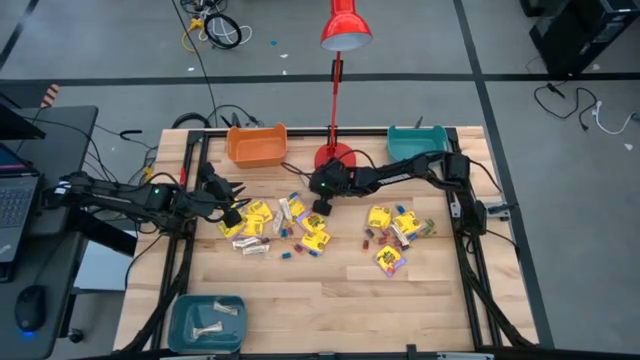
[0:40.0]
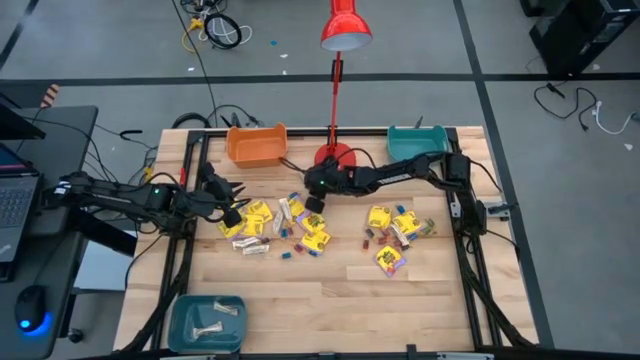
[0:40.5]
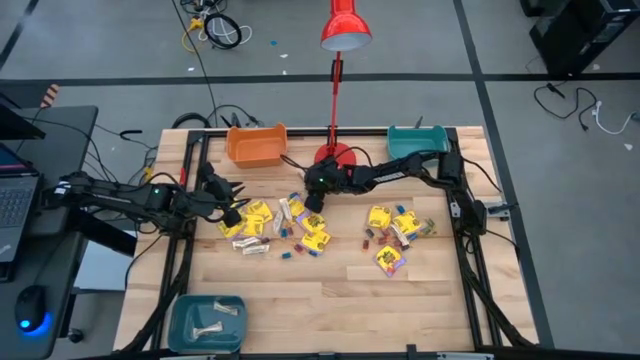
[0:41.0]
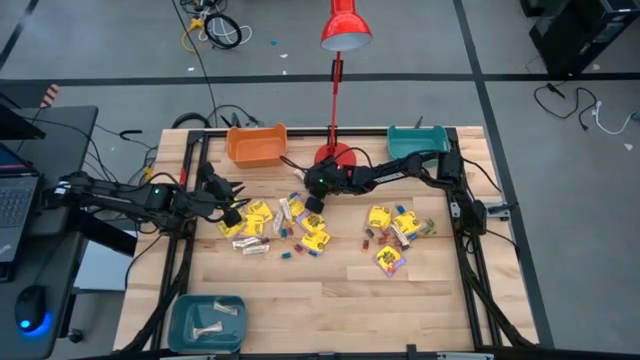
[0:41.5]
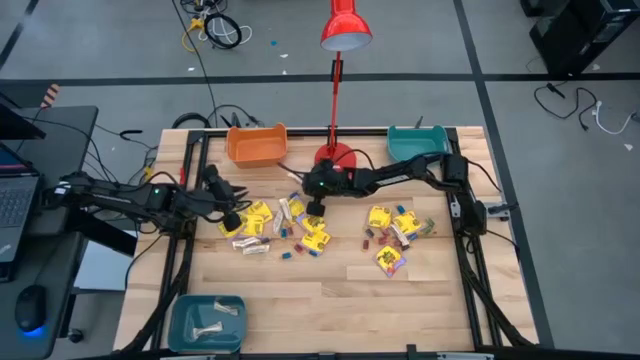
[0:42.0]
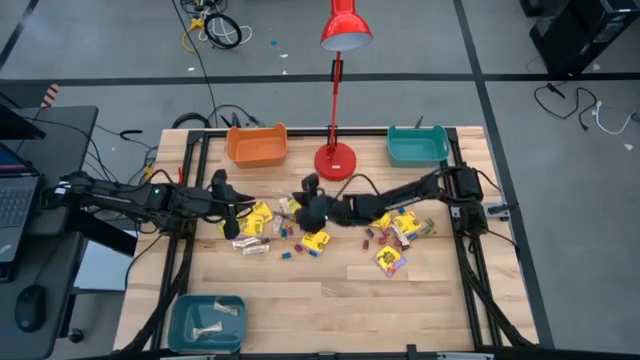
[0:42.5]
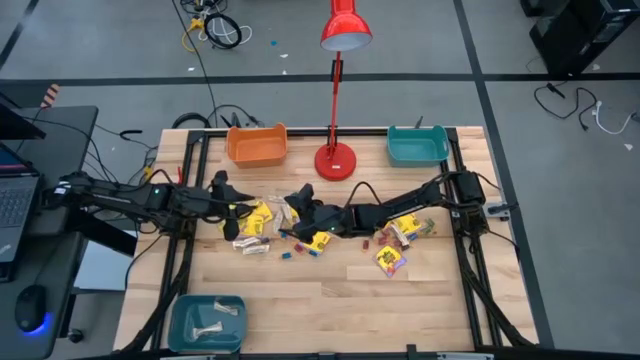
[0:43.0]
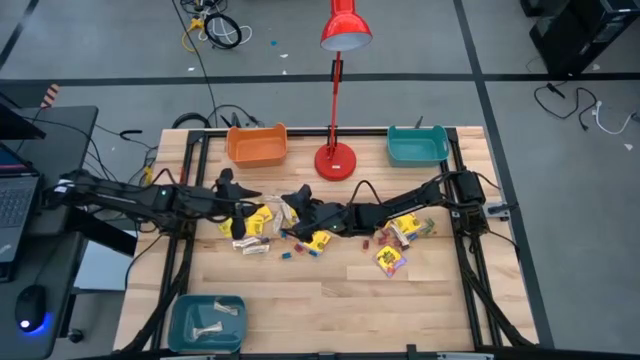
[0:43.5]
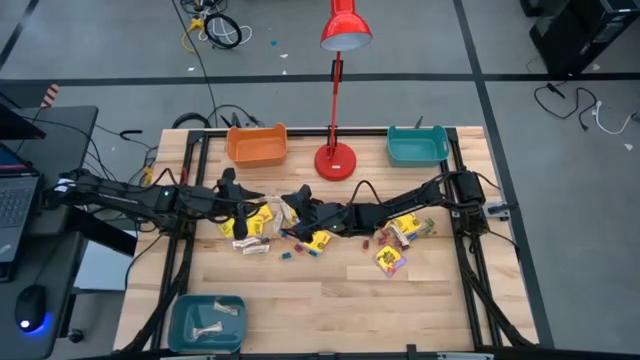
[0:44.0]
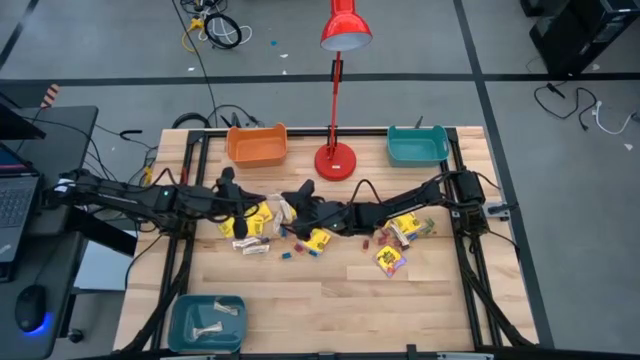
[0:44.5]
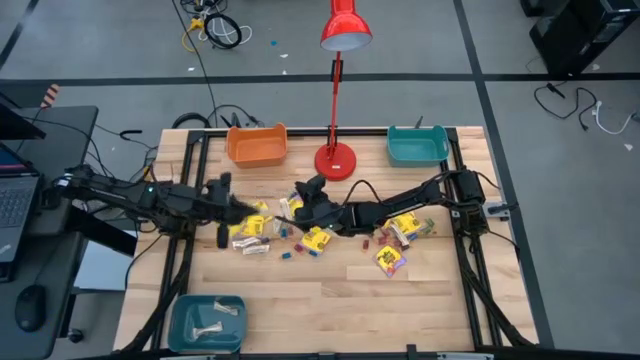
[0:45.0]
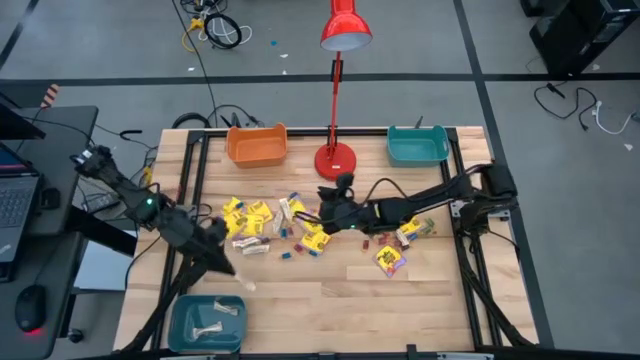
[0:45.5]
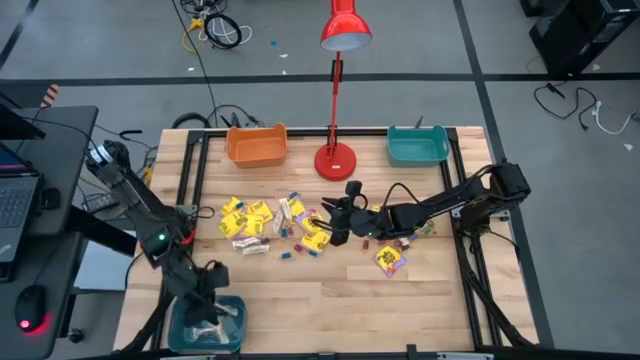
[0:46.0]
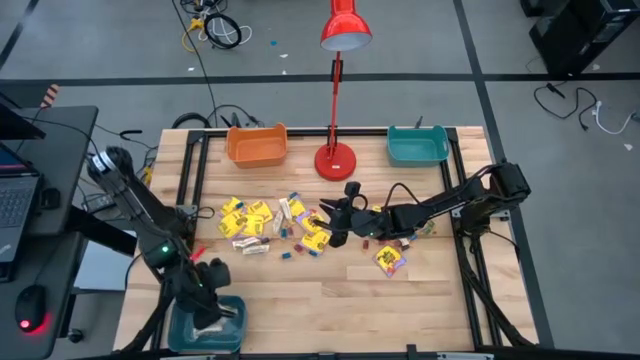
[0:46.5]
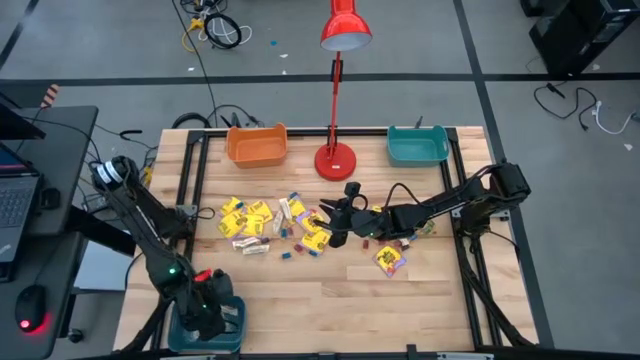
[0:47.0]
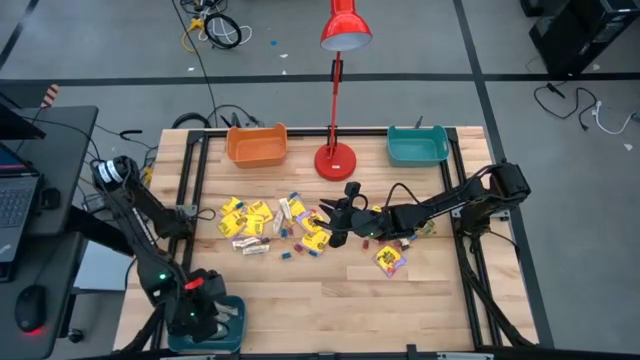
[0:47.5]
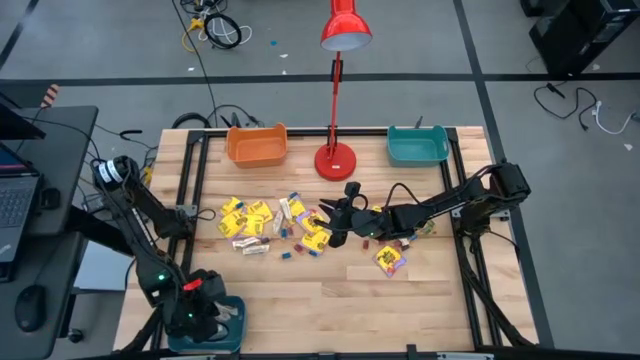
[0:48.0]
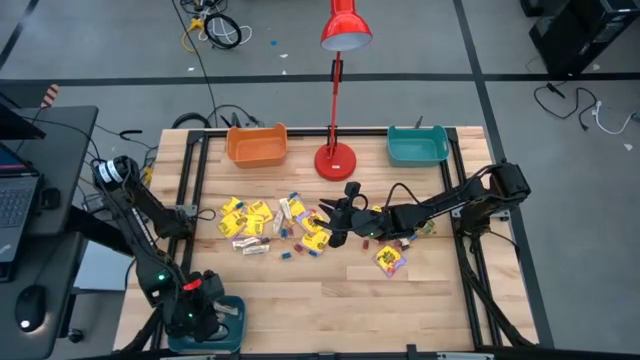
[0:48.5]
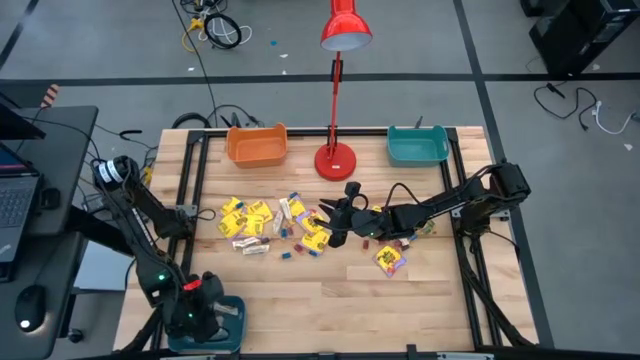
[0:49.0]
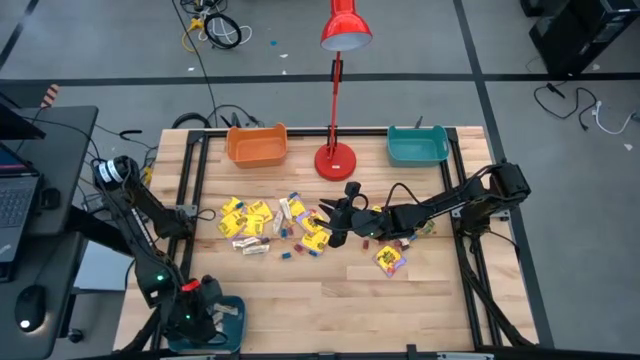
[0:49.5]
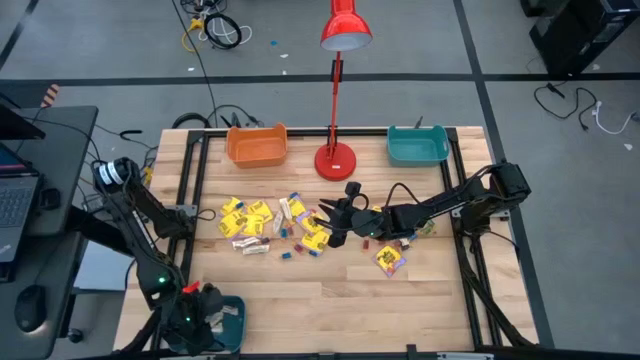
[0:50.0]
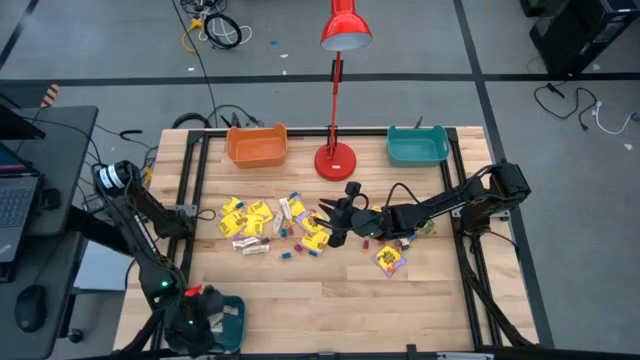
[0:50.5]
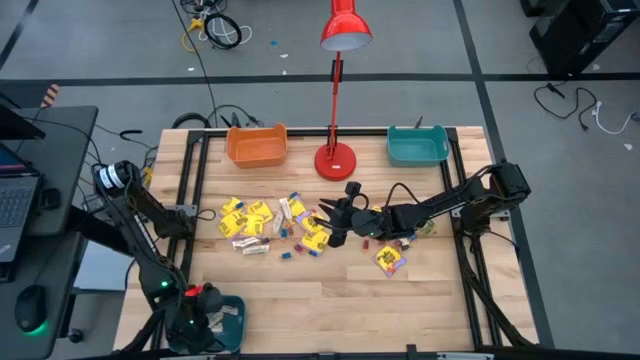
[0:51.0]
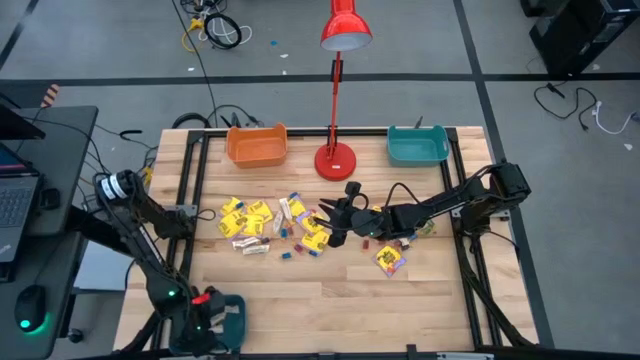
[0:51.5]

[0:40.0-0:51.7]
Task: Sort candy
Put the white candy into the blue bin

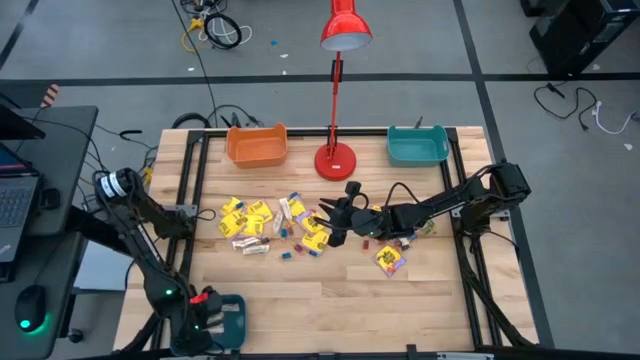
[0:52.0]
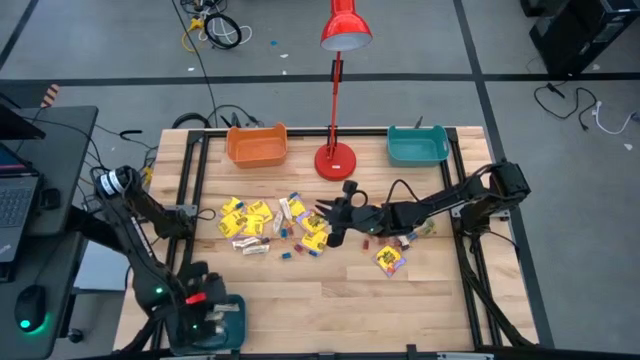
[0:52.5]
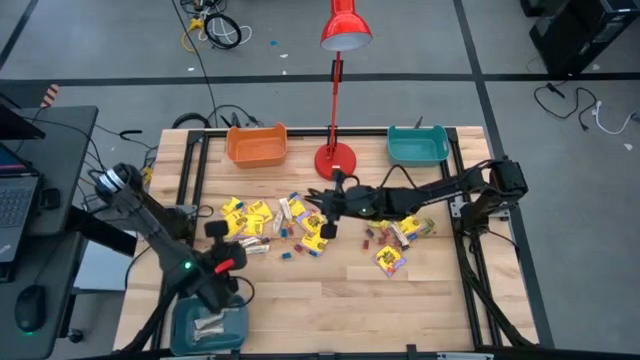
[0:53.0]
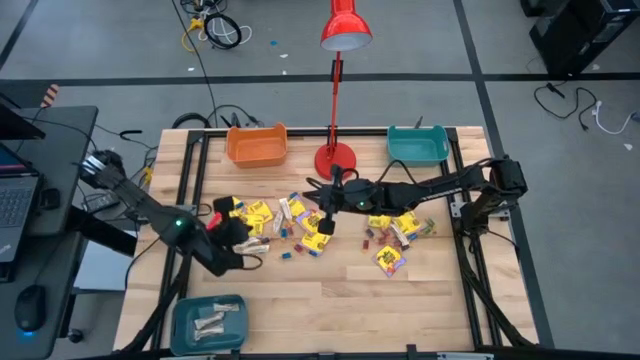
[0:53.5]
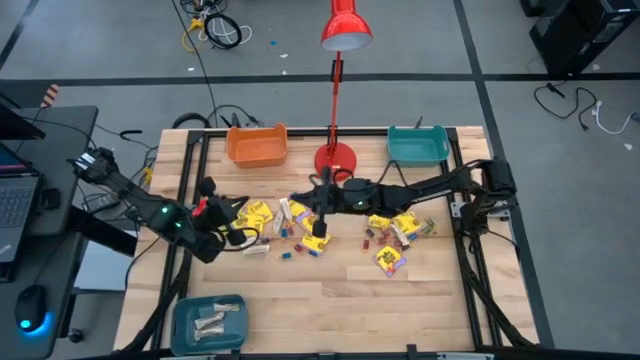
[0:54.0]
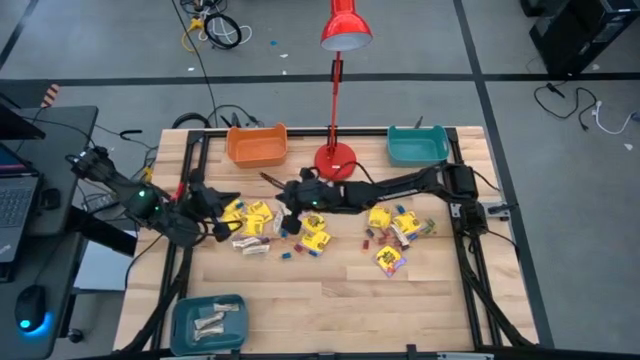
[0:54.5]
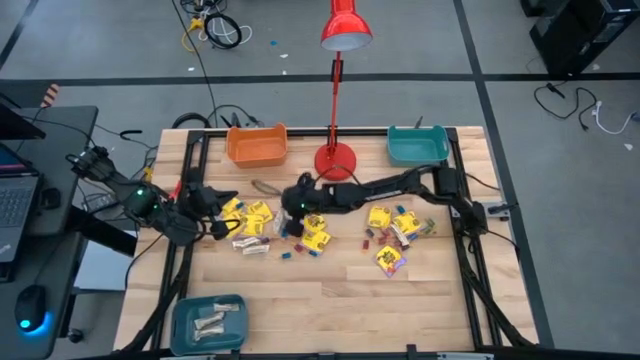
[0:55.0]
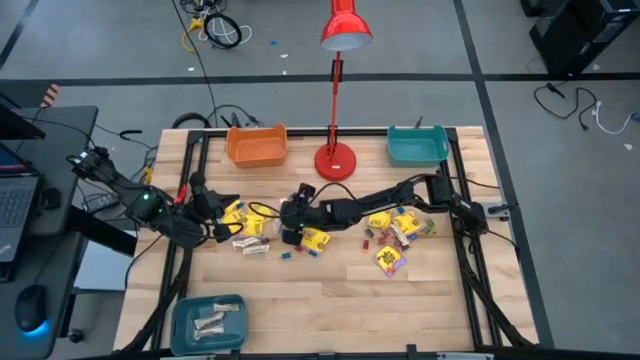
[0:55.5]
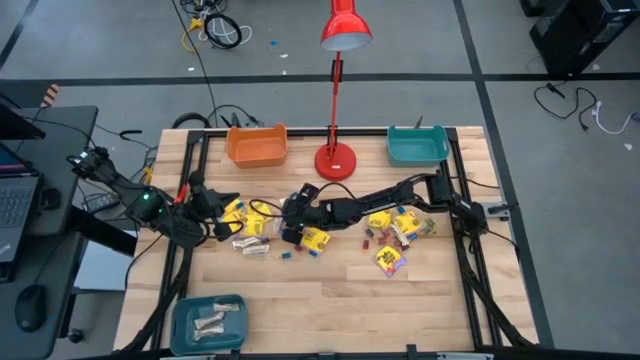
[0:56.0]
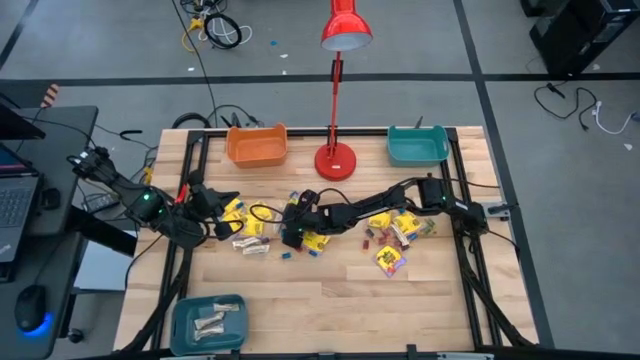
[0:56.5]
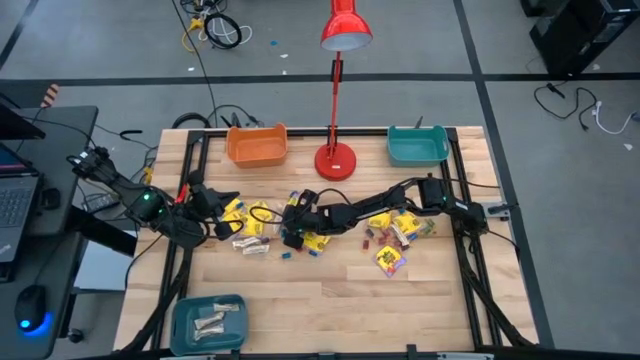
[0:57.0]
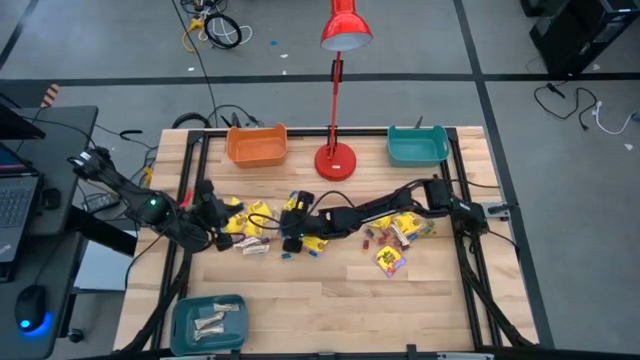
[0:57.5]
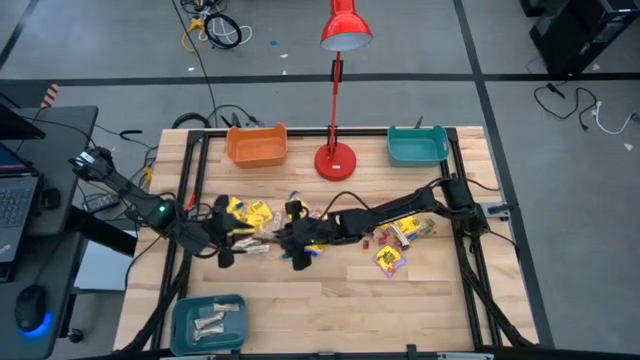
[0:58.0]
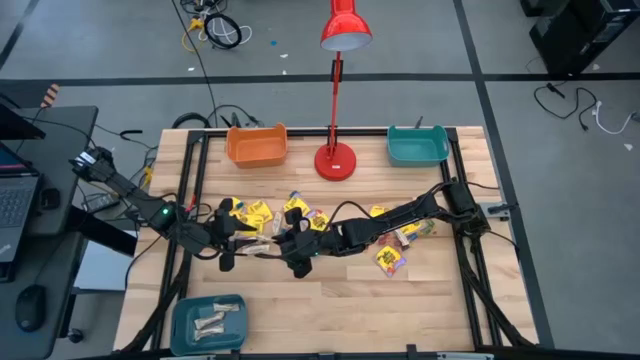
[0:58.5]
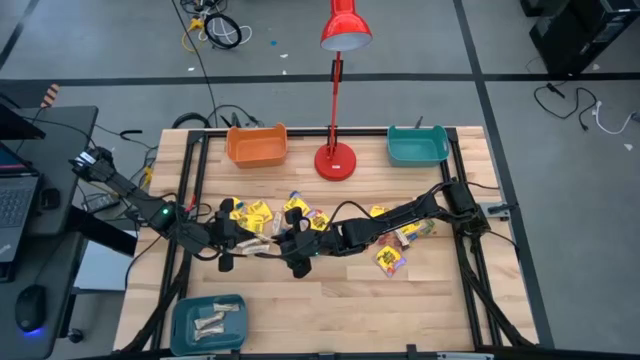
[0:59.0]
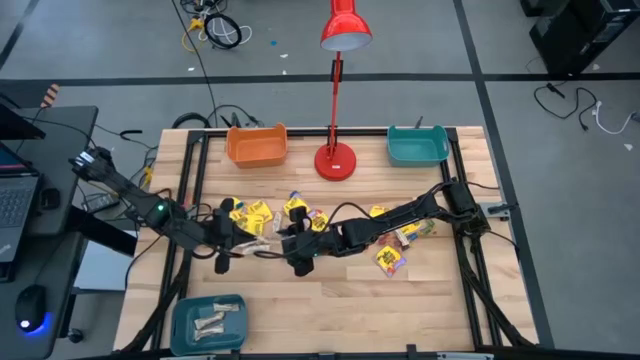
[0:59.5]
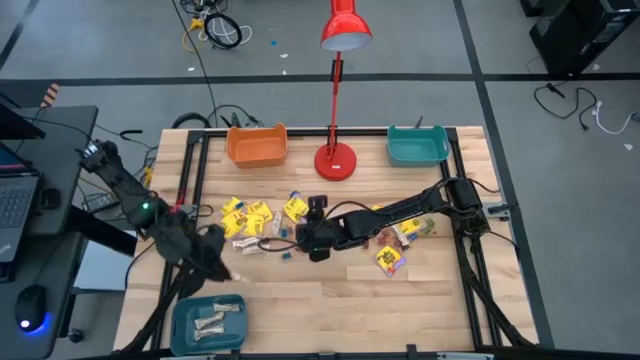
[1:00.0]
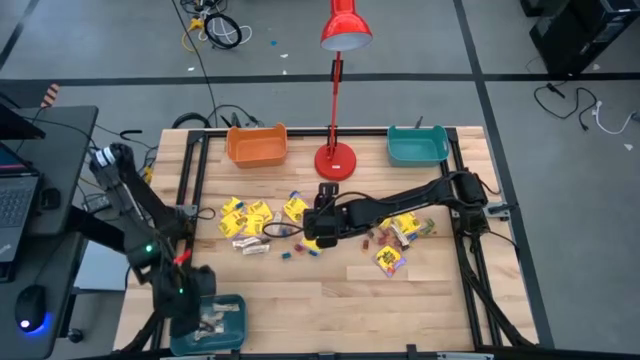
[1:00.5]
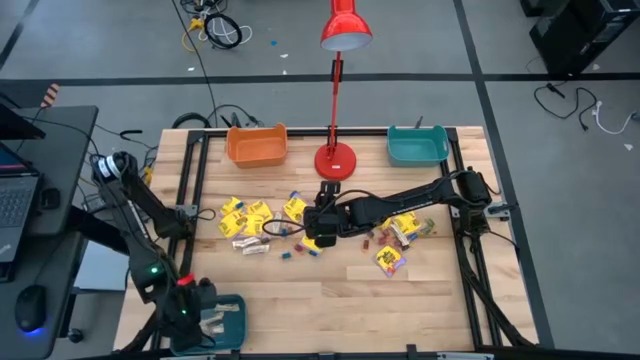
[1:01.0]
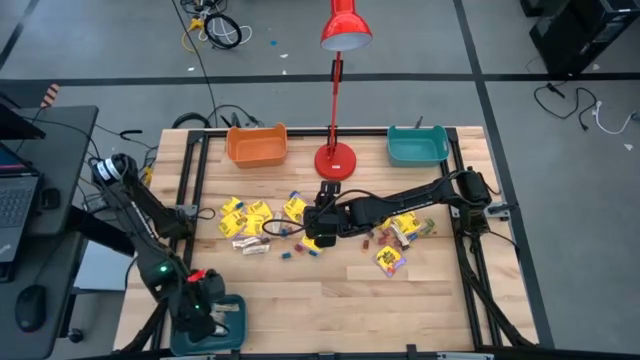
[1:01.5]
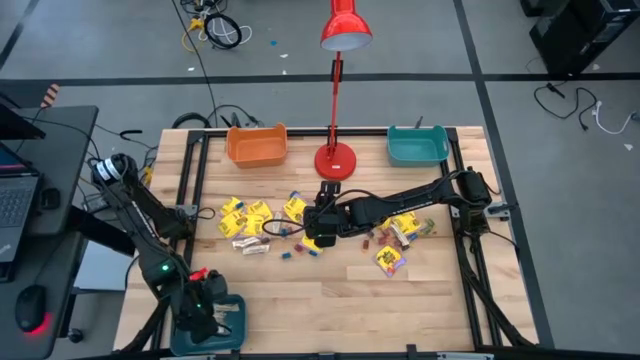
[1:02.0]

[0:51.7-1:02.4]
Put the white candy into the blue bin
